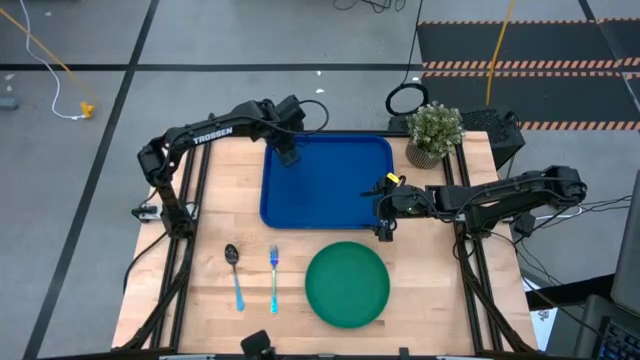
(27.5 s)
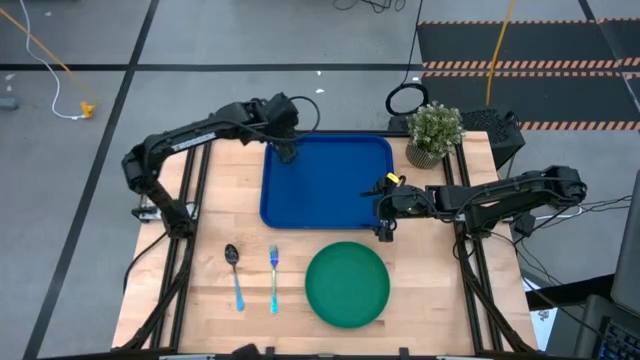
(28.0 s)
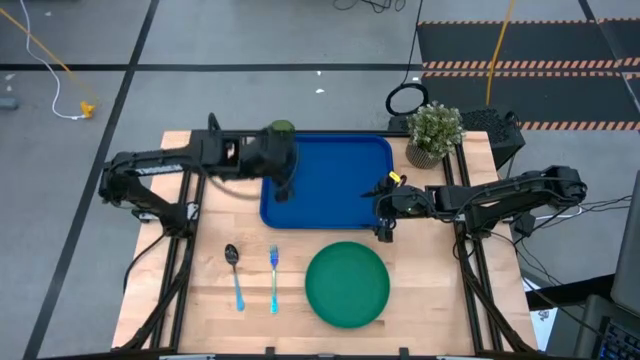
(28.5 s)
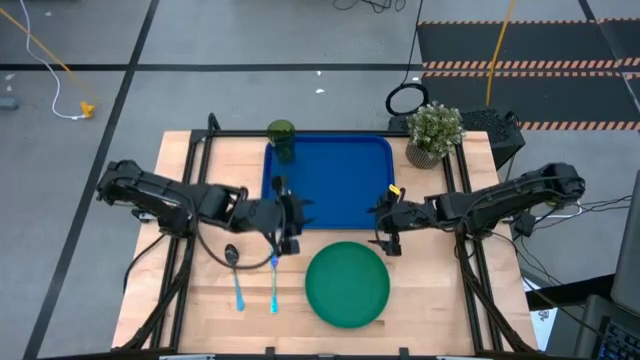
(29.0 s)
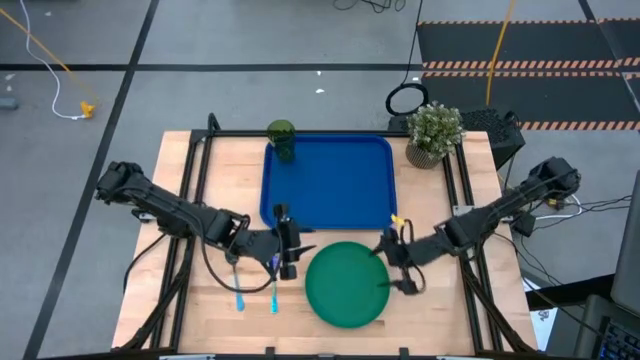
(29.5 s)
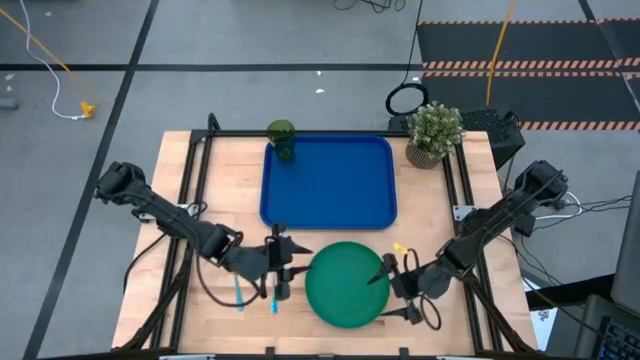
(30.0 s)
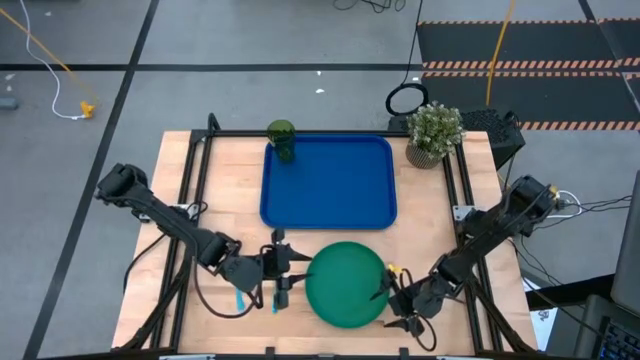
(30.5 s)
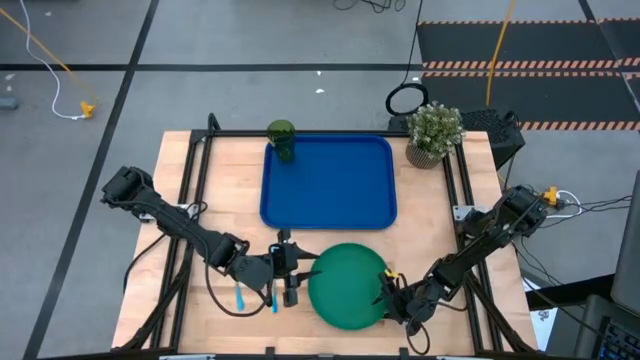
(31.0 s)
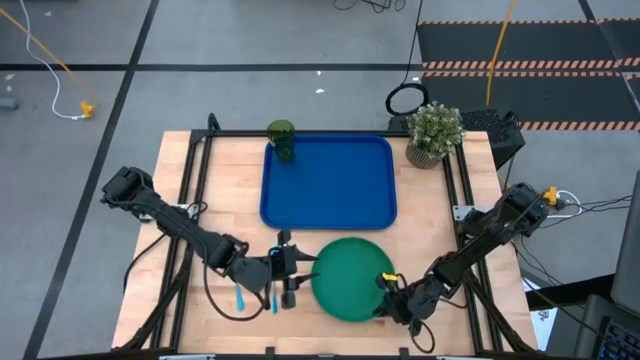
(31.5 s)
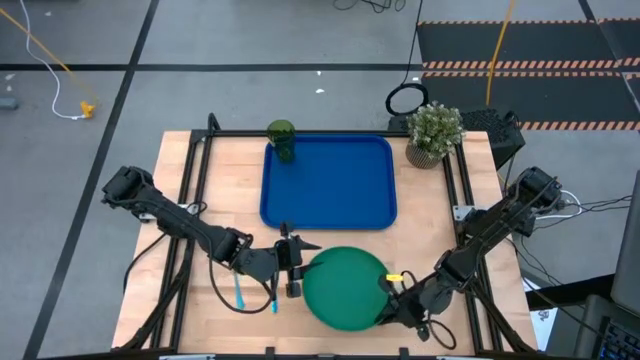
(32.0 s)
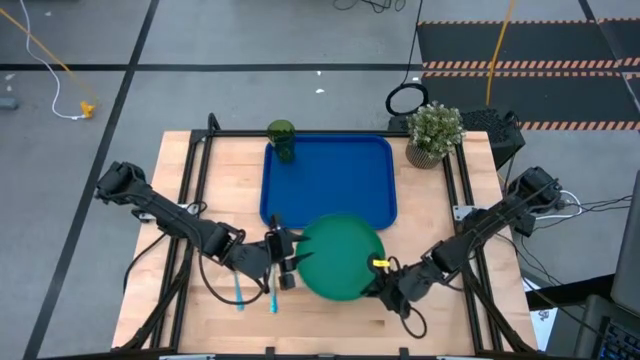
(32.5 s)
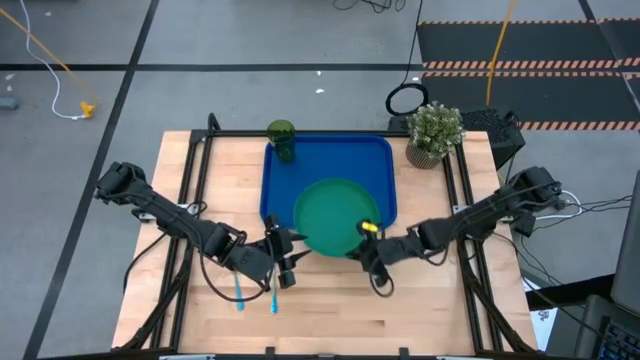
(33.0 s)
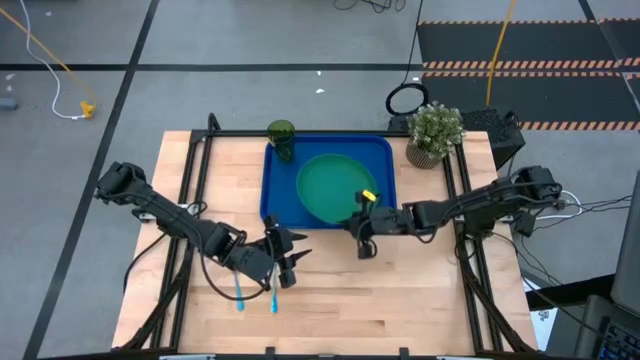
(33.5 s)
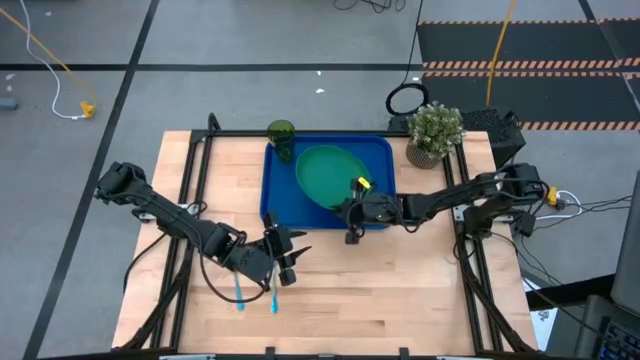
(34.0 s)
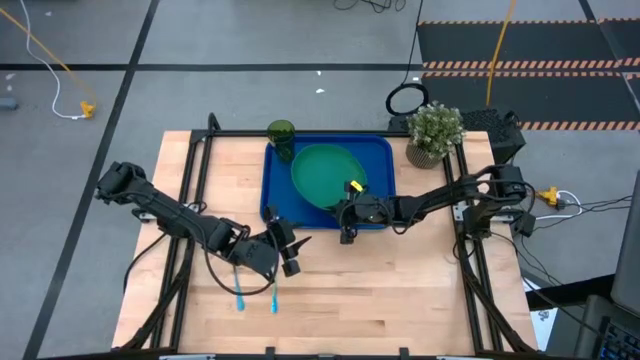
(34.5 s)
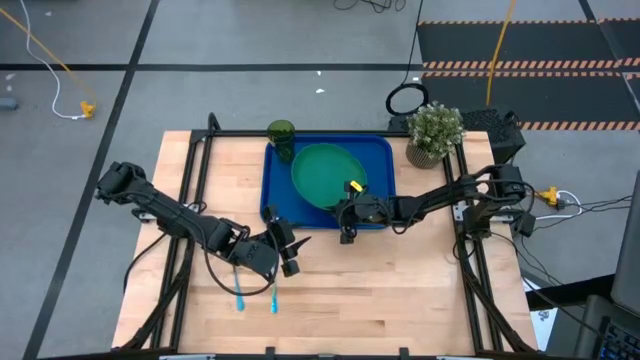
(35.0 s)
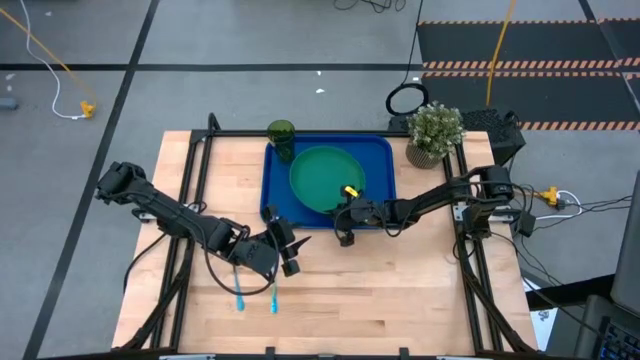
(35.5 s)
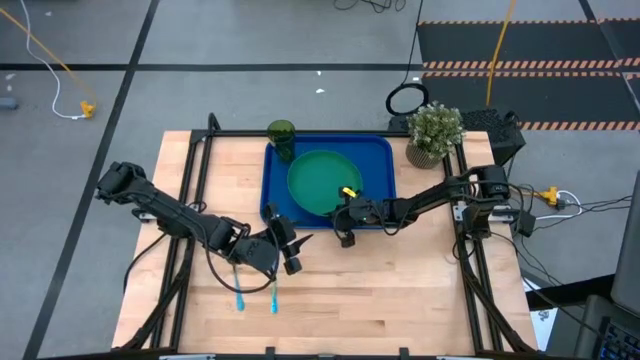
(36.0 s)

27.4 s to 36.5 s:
Task: Pick and place plate/cup/fork/spoon on tray
Put the green plate on the center of the blue tray

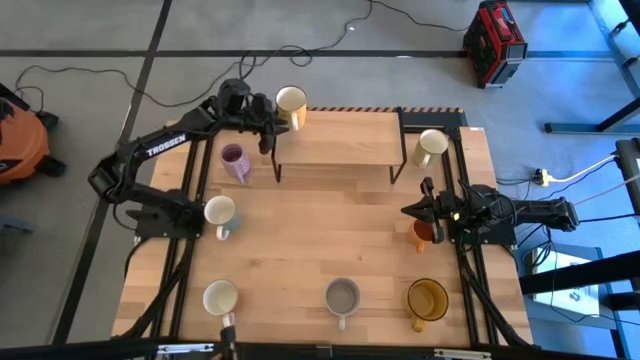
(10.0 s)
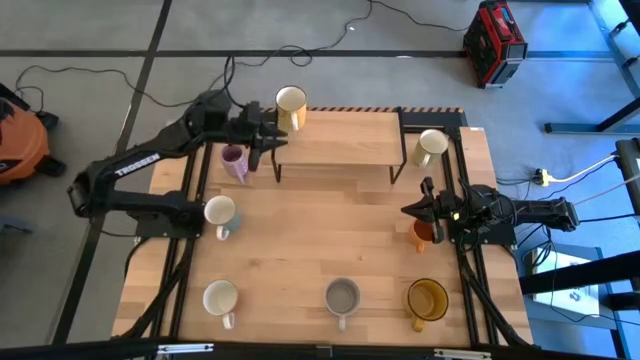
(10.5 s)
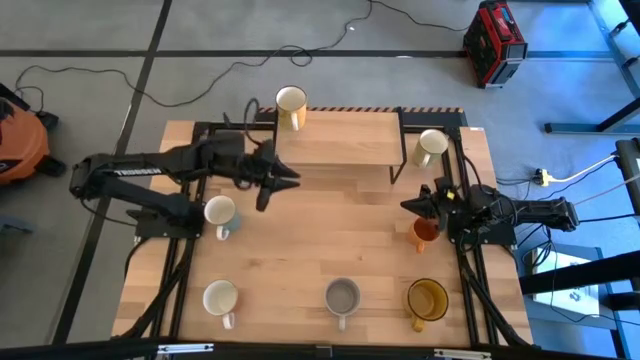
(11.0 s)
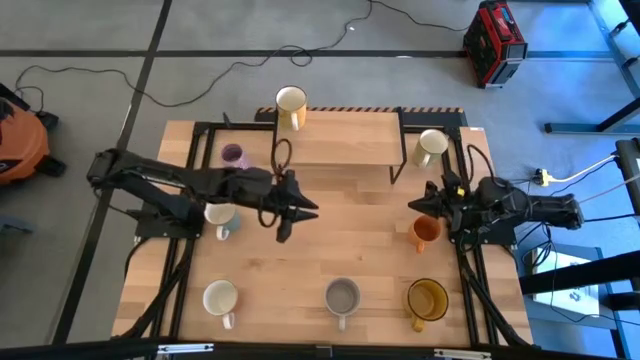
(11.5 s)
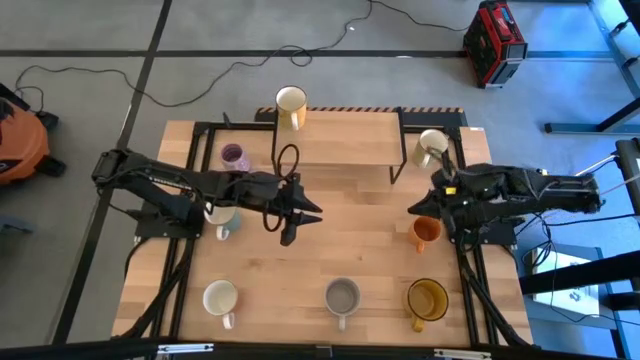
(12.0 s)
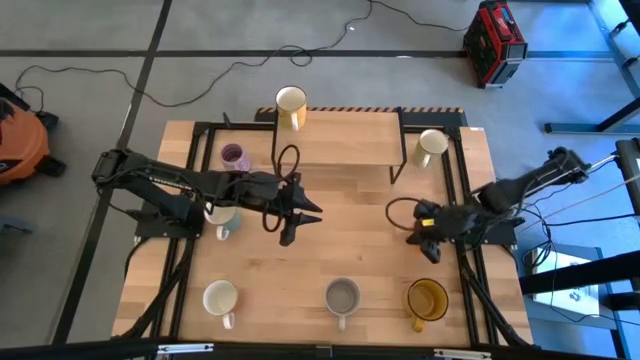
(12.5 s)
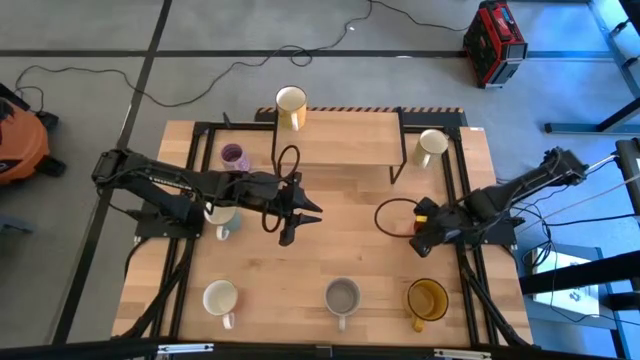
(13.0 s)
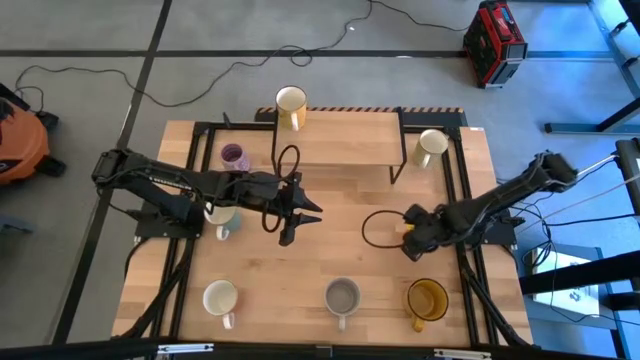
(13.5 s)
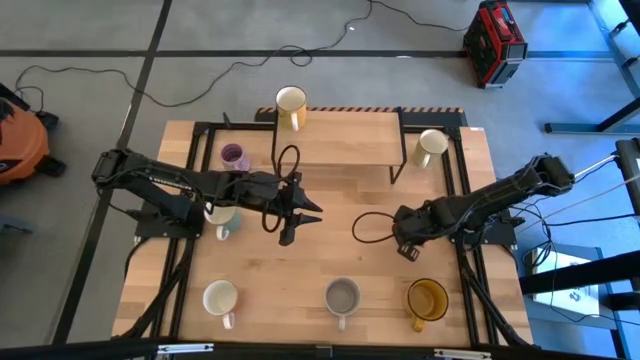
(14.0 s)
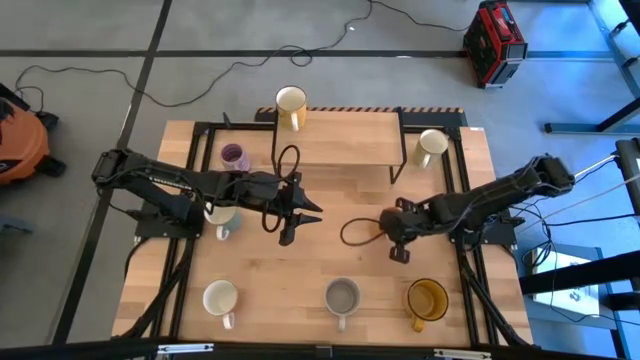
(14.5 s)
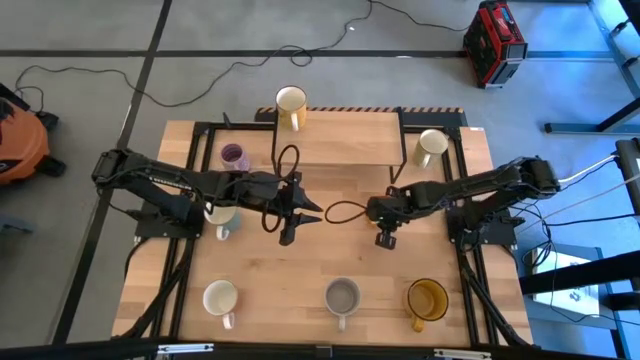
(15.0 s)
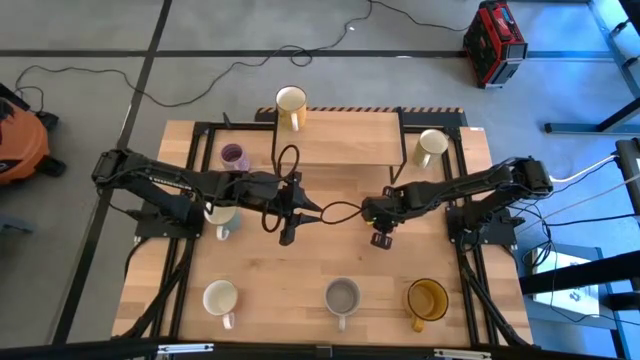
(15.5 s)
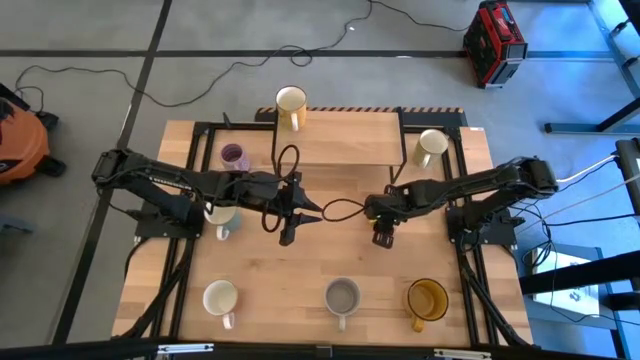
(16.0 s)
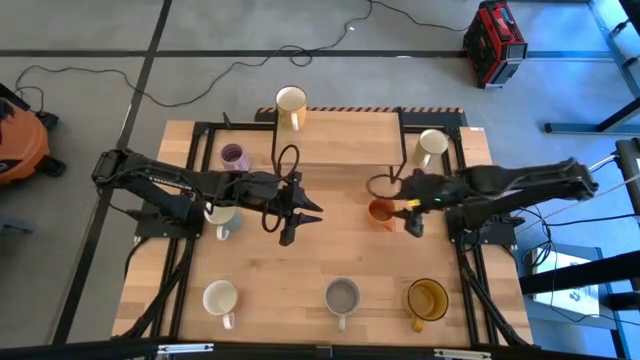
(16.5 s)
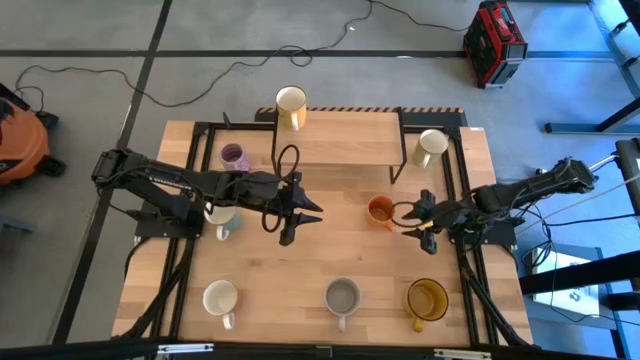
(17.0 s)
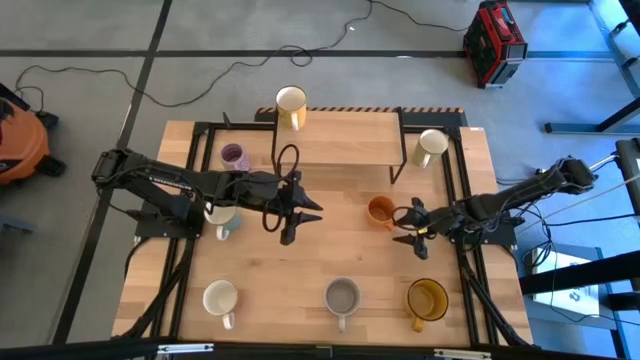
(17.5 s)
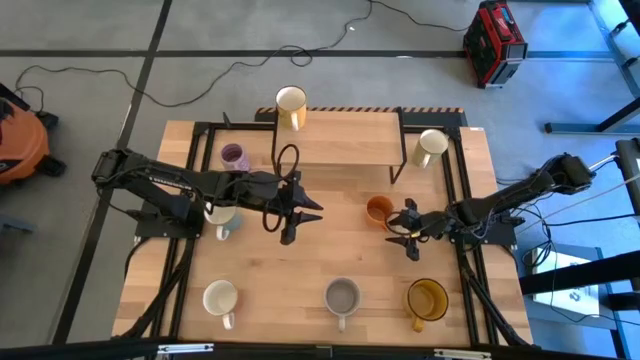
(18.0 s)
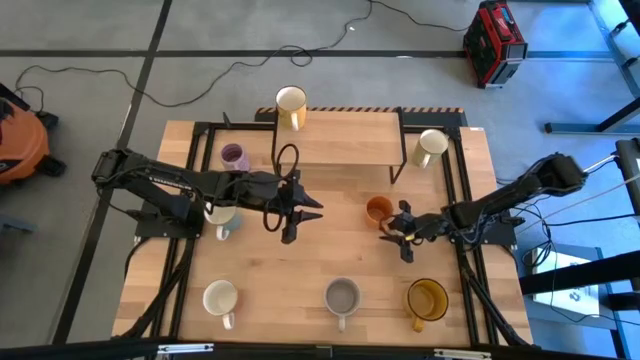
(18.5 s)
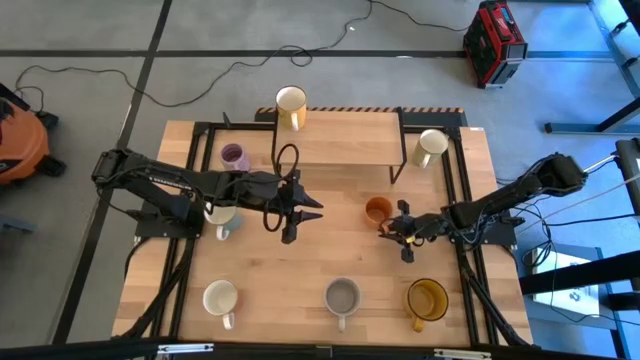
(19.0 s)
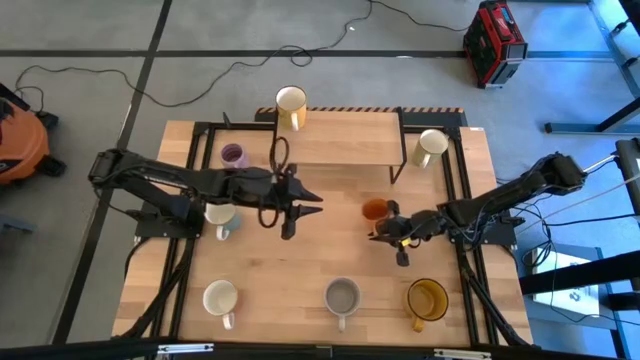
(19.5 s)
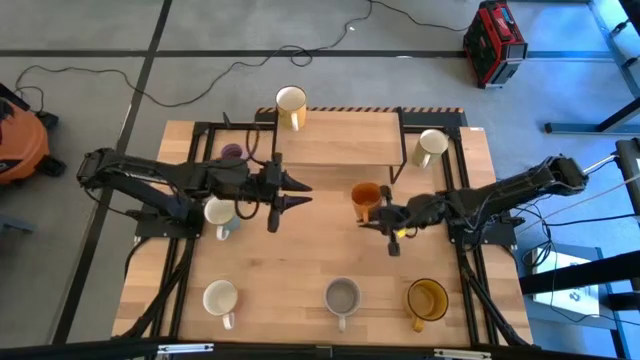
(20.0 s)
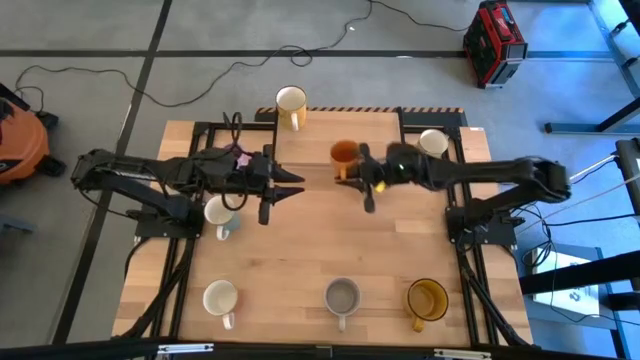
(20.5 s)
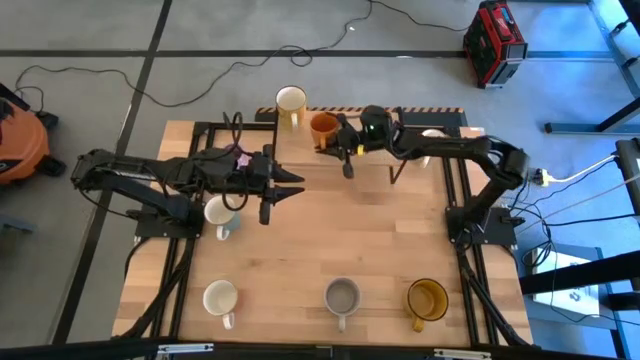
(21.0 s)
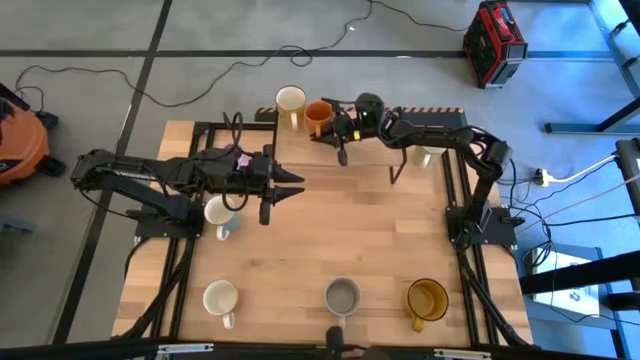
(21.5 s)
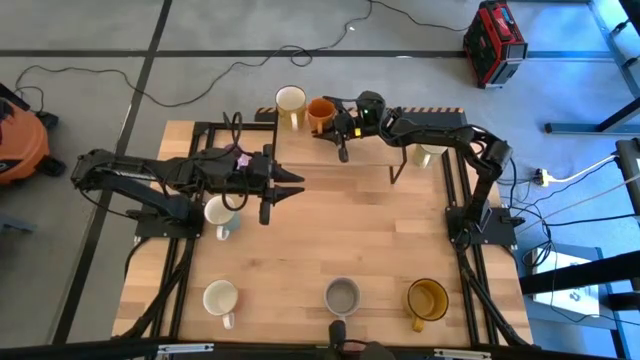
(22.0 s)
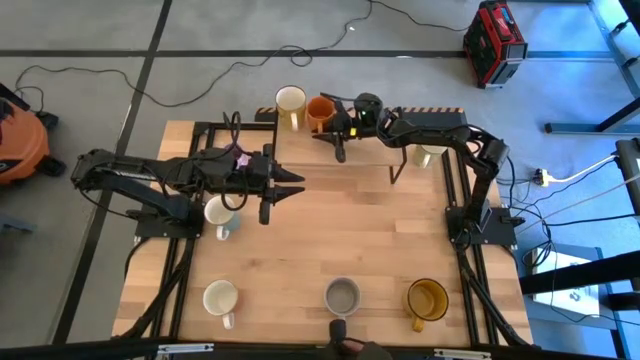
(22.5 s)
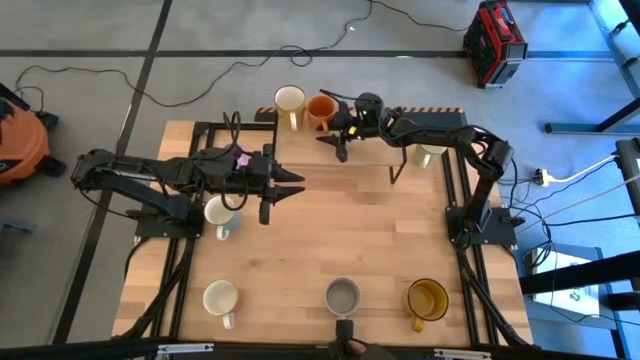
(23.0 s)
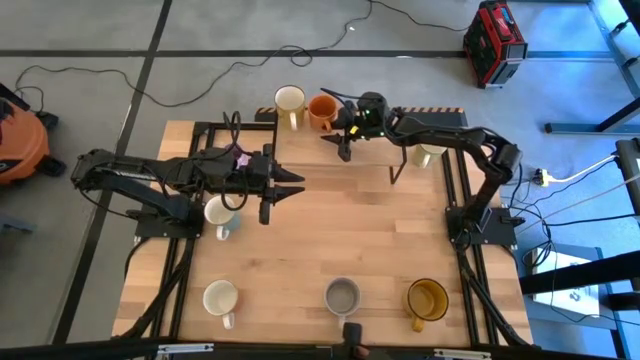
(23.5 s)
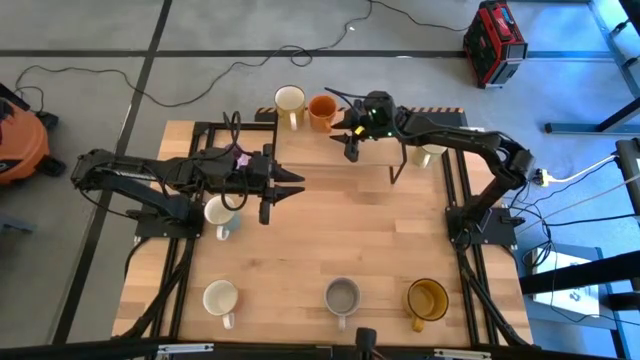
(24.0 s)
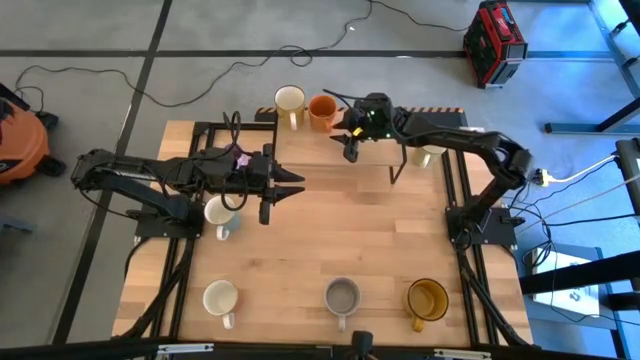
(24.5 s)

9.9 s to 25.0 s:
Task: Place coffee mugs
Put the orange mug on the shelf
